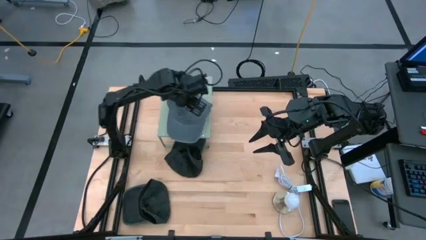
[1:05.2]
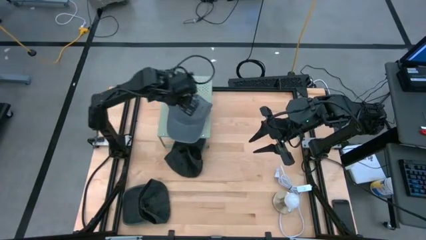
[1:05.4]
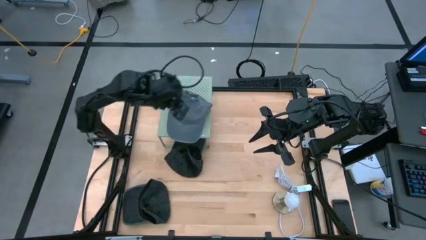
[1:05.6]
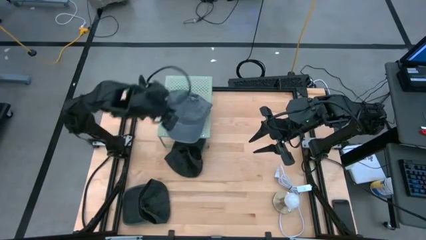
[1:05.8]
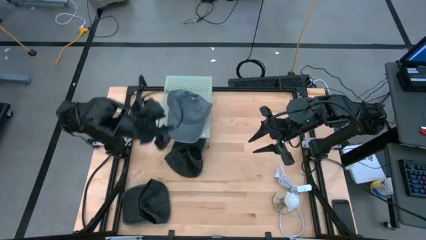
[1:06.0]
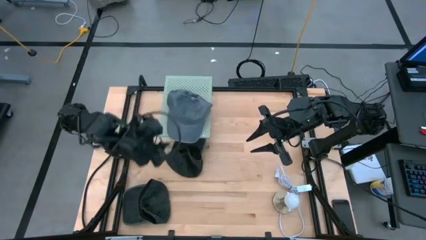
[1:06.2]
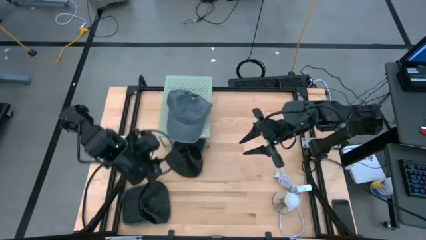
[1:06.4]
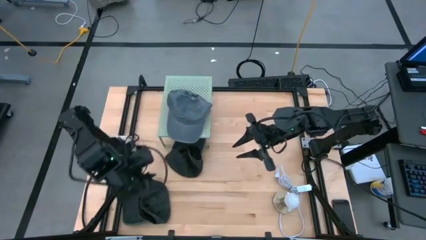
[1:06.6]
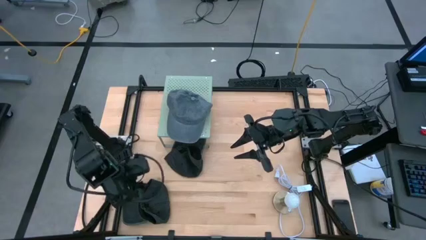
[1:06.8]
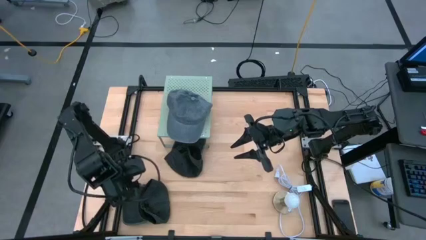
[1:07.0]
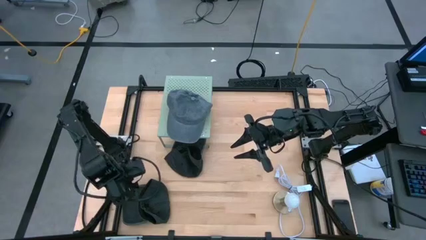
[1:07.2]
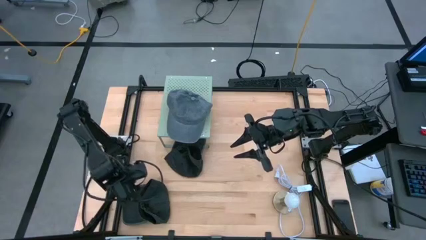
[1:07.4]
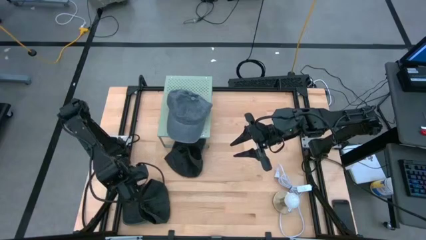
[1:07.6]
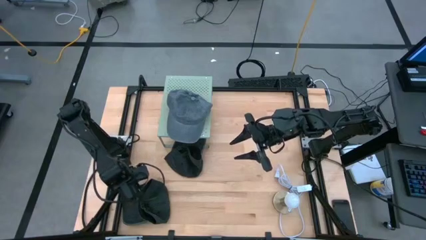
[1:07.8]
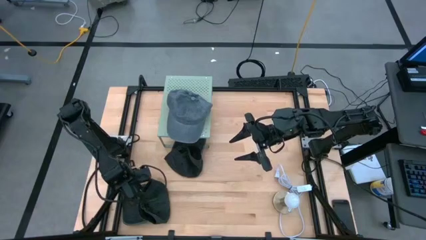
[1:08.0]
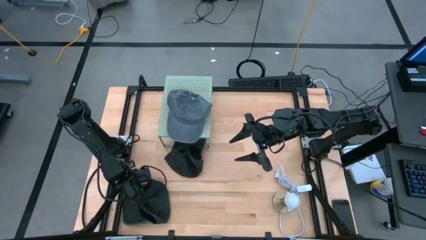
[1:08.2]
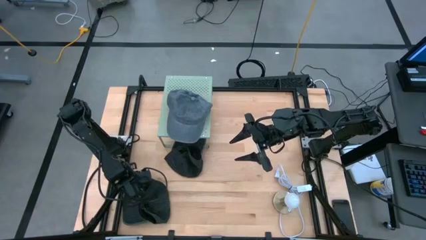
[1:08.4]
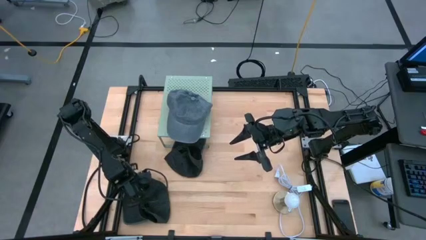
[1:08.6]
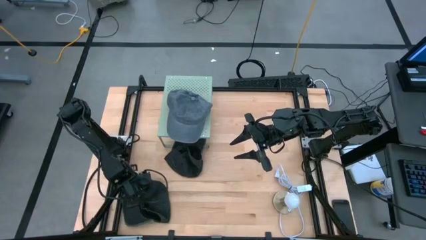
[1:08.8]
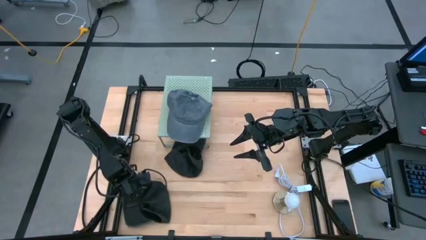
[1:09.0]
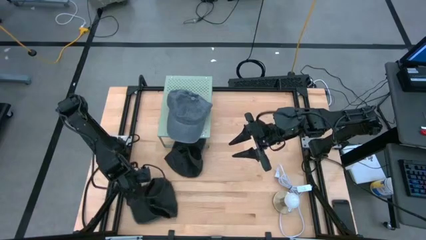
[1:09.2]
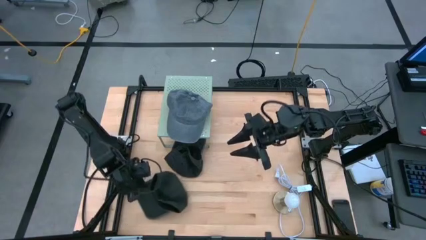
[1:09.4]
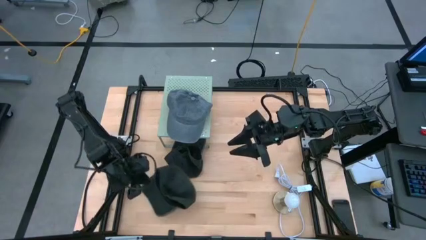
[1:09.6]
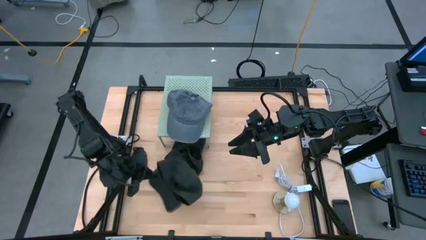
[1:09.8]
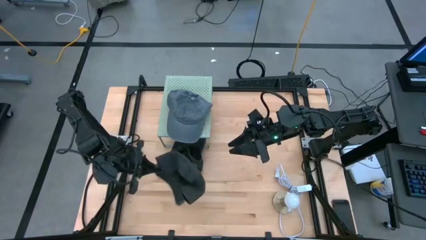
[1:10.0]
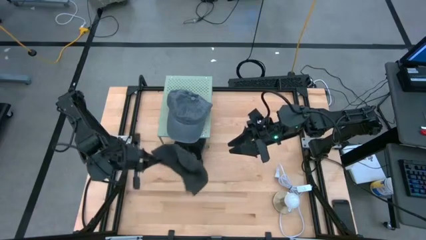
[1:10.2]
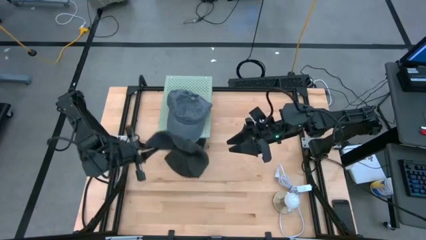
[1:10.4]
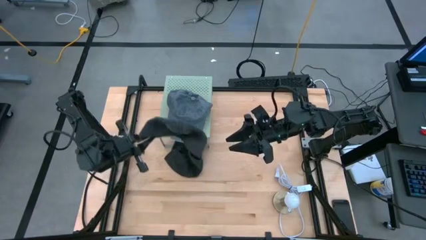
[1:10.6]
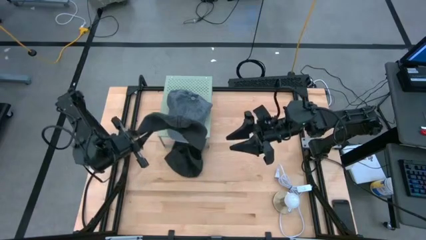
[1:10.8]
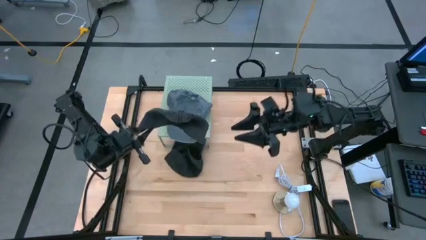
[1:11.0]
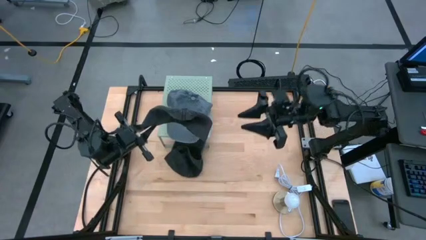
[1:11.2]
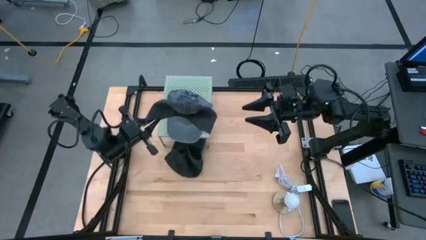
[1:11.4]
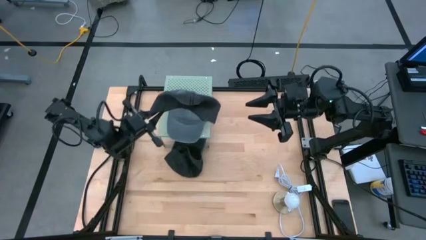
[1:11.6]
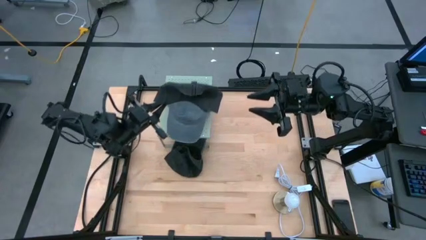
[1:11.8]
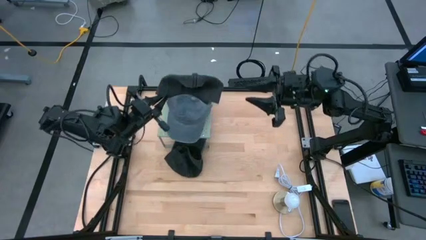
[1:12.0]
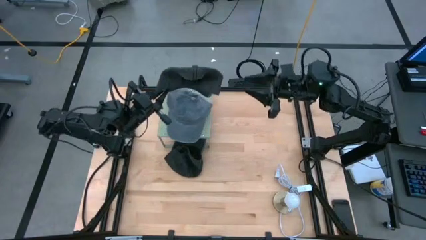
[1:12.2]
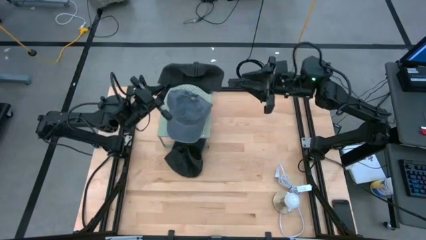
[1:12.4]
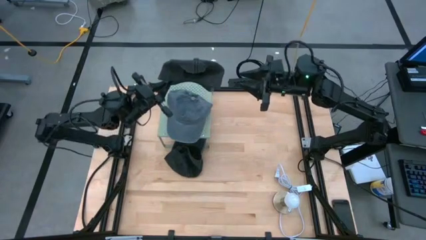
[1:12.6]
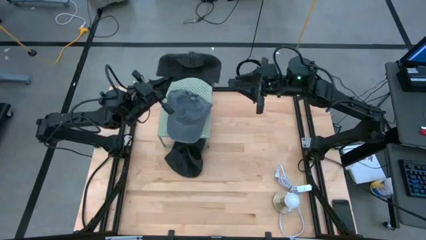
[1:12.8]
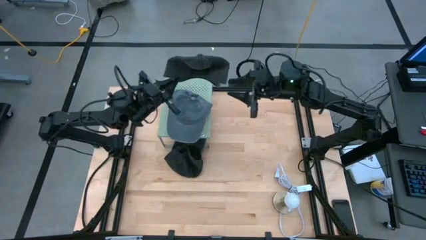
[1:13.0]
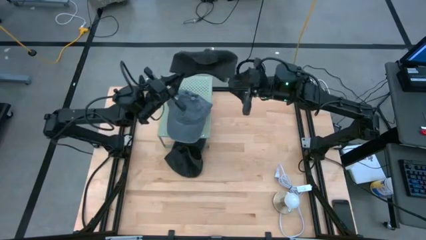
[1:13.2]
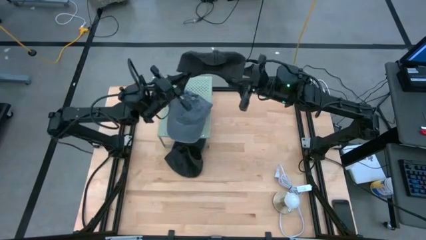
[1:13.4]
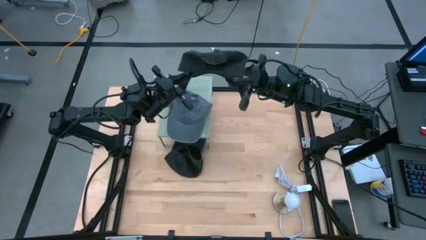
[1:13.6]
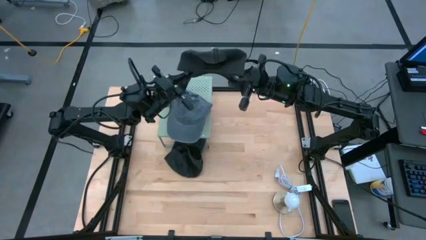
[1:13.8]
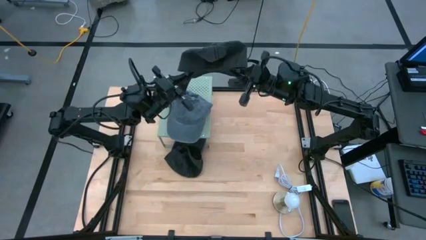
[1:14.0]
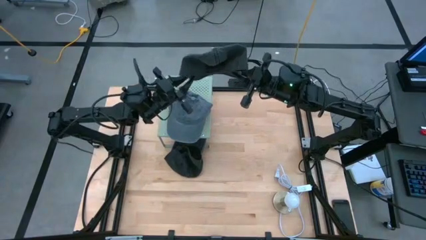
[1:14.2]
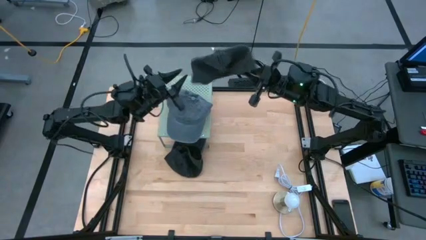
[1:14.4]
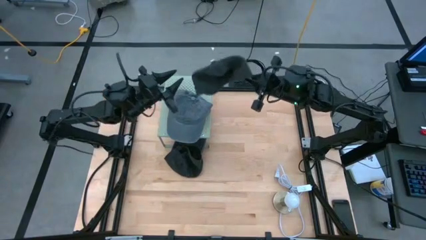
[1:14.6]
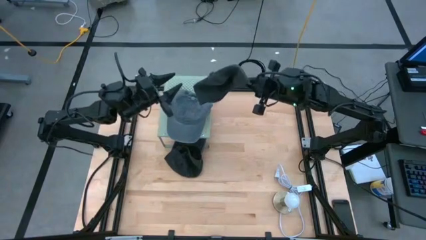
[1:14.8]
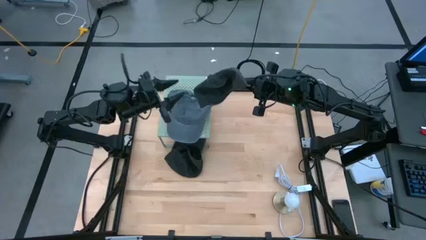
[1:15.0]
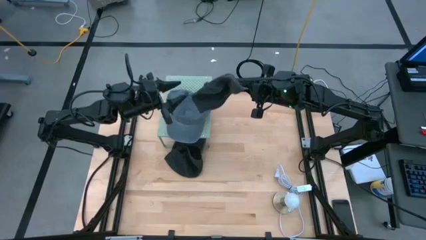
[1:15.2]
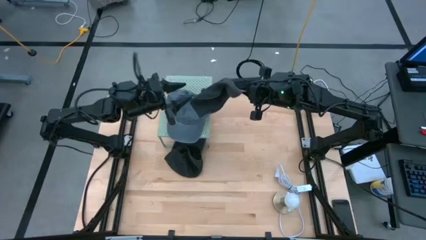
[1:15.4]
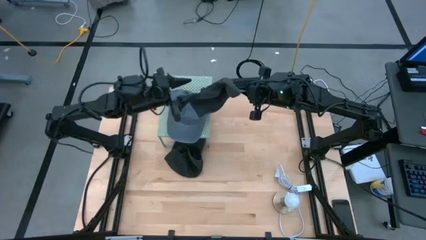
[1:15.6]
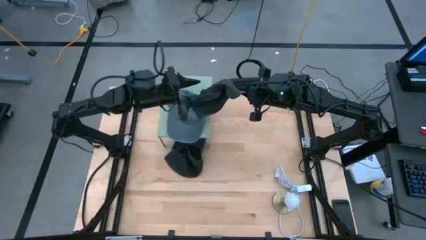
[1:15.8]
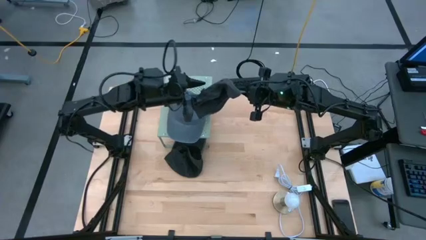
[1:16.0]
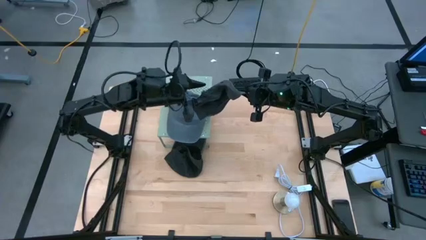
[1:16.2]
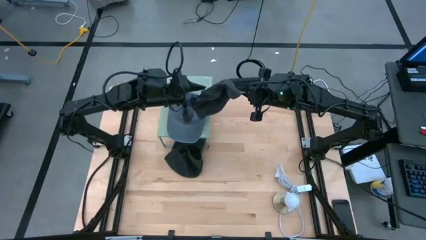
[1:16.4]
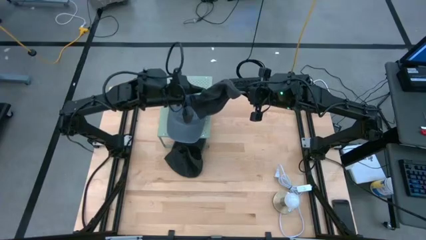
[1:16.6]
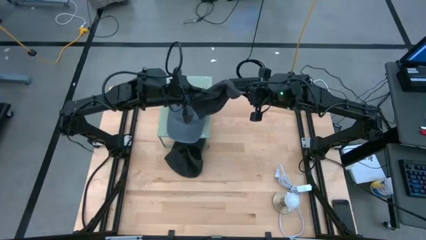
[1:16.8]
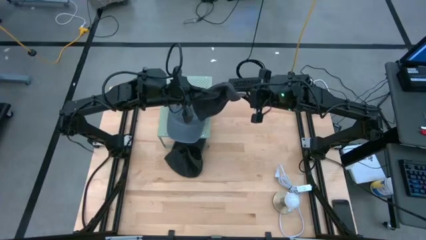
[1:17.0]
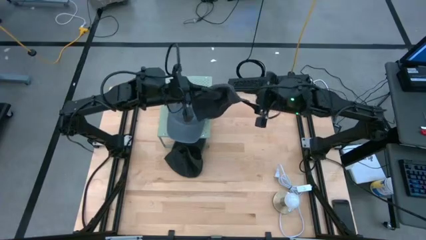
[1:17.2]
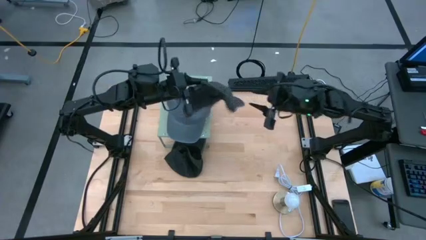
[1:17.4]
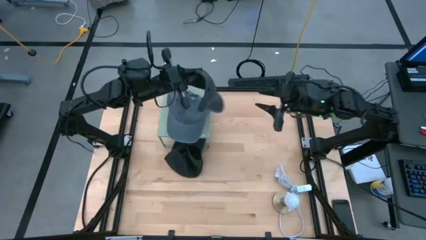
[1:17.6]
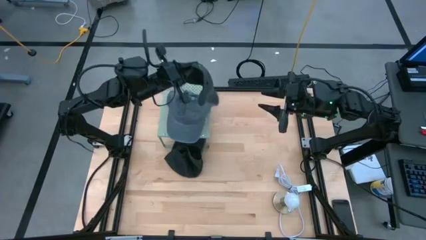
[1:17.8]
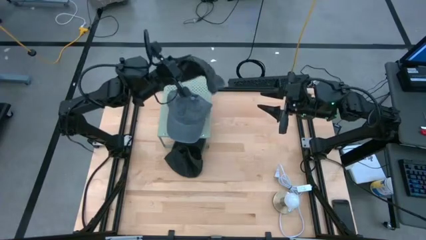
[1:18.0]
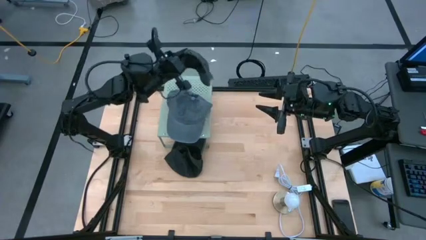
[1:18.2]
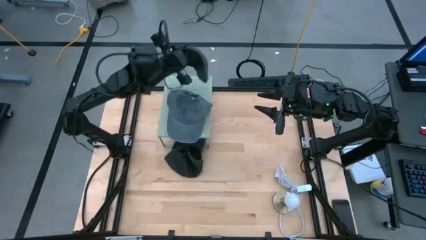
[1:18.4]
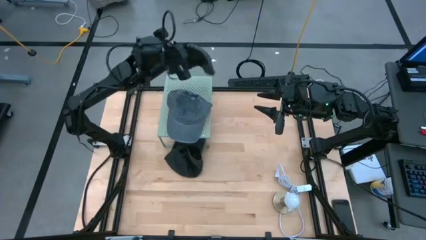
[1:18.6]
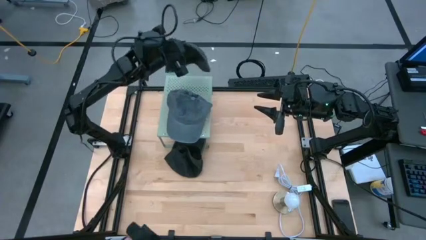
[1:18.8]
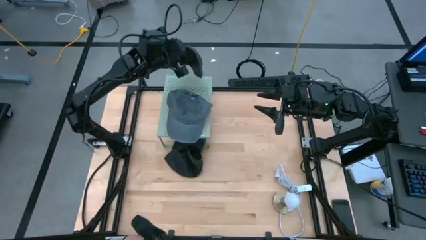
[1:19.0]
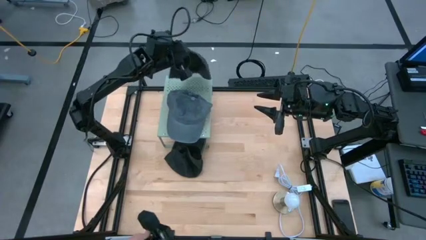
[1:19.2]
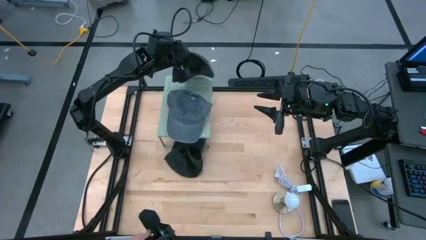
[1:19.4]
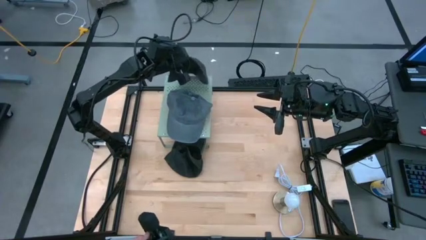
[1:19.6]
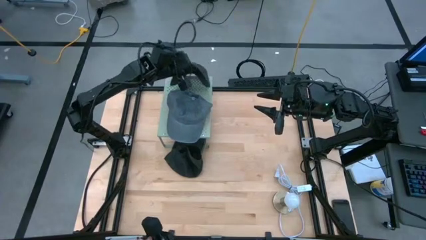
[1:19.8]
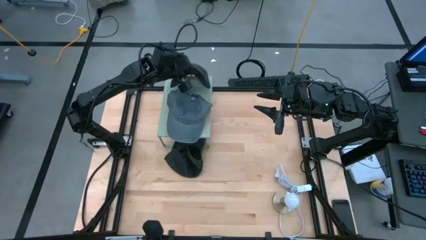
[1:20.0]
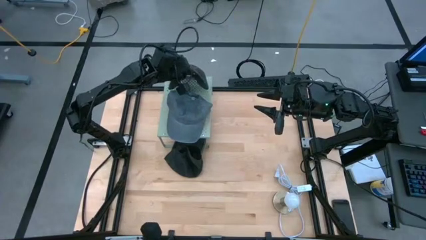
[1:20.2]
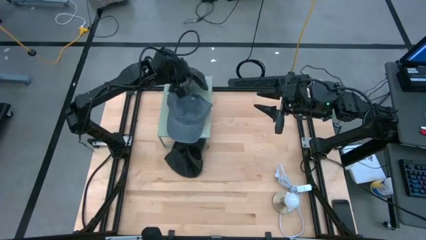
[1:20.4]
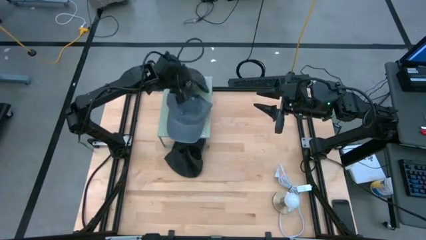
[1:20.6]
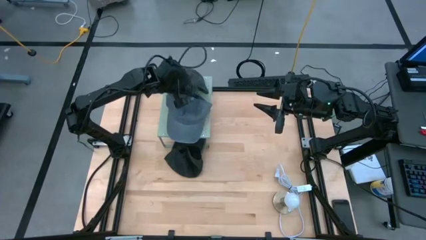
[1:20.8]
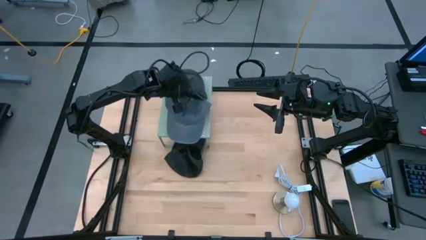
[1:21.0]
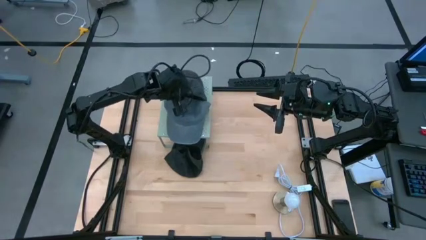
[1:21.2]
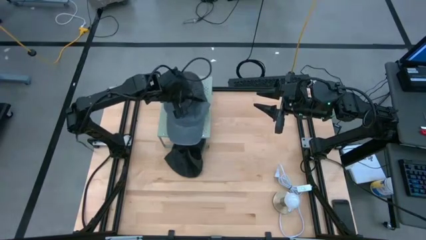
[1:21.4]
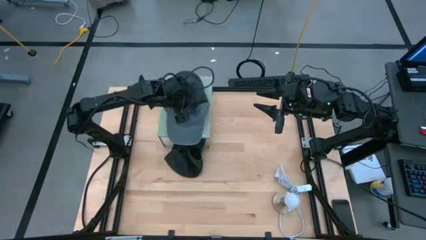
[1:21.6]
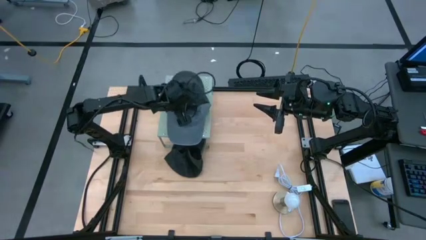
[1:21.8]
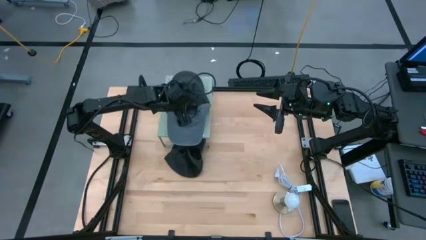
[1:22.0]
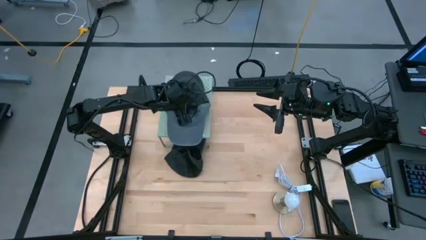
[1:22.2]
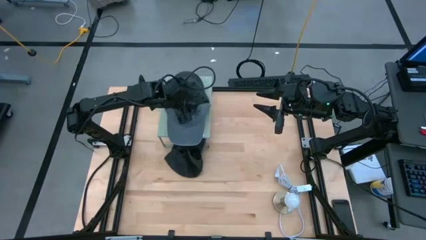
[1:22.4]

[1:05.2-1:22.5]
Task: Pick & Place hat
Put the bottom black cap on the shelf
